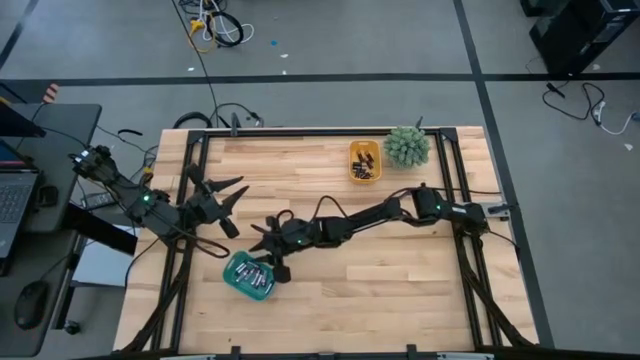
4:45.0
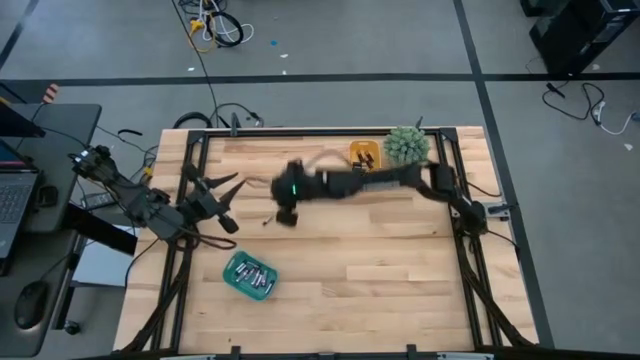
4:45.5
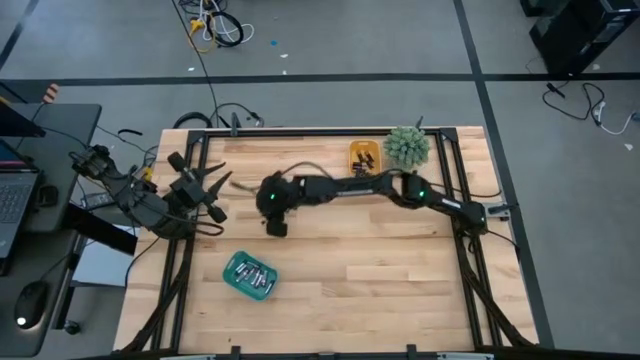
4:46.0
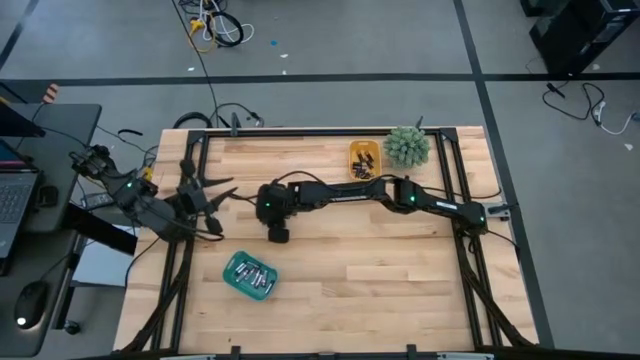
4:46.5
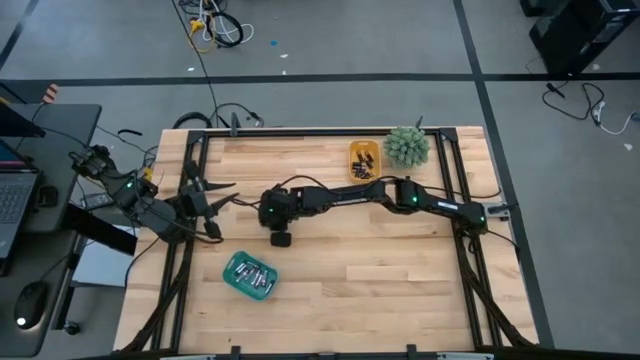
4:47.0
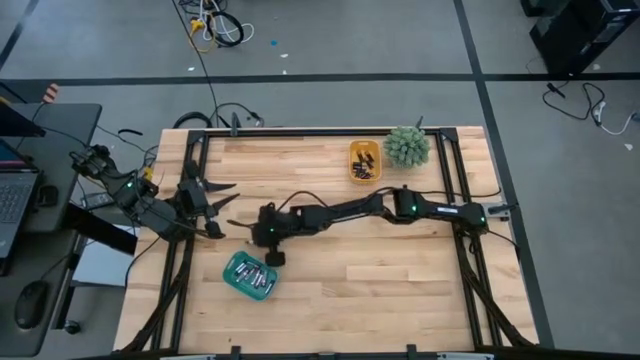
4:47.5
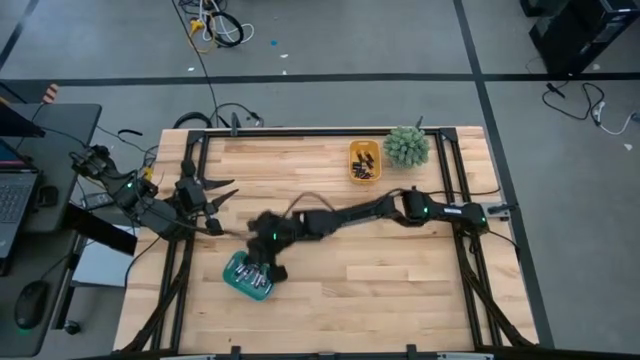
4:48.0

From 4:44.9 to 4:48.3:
Task: Sort batteries
Put the silver battery into the green bin

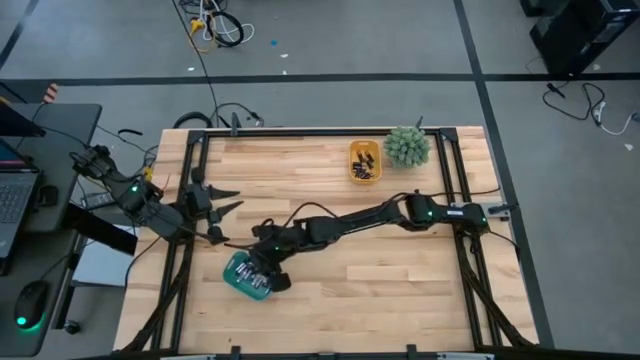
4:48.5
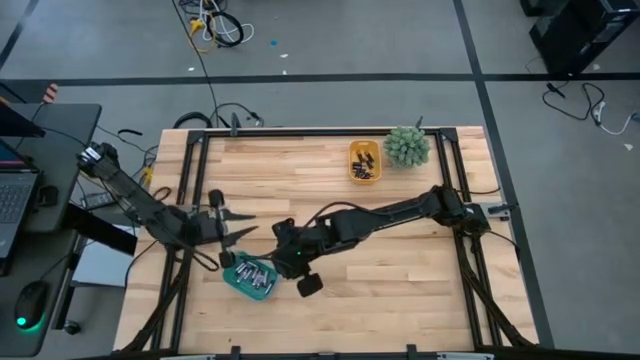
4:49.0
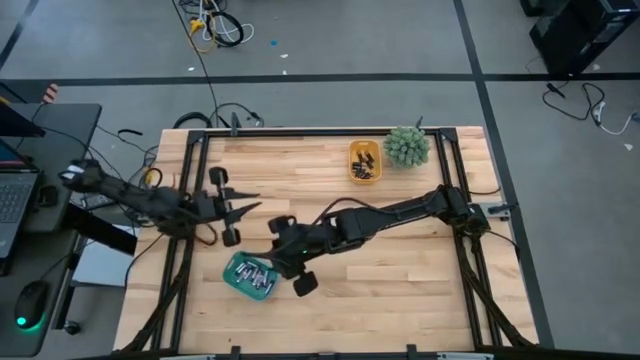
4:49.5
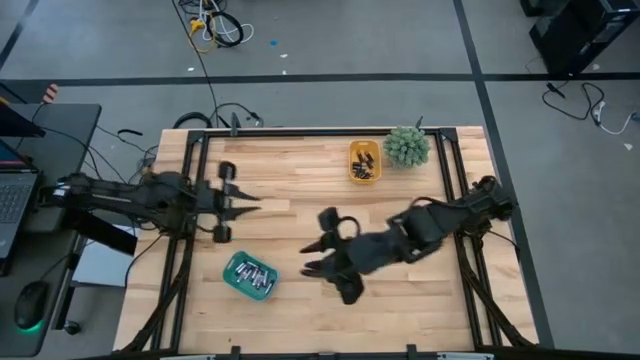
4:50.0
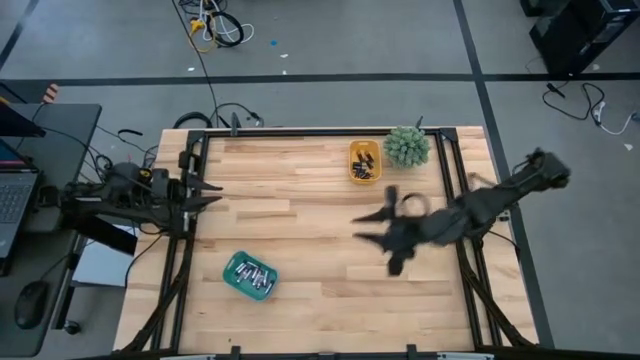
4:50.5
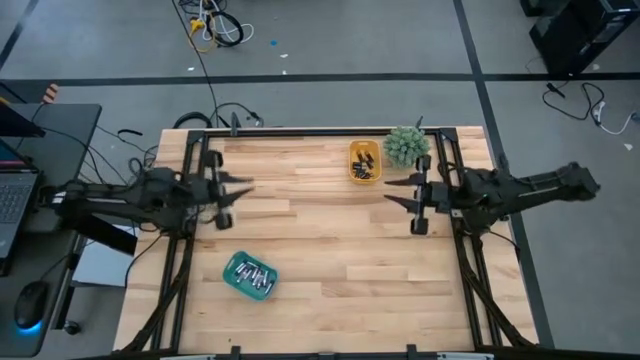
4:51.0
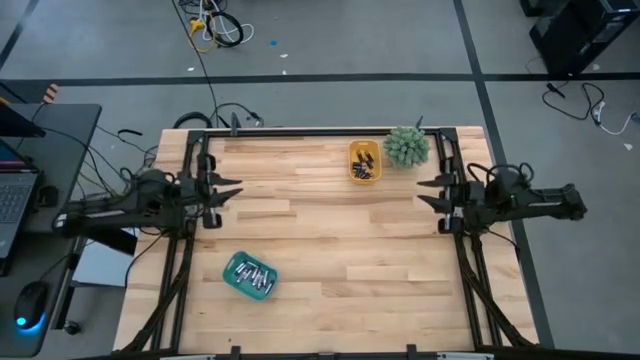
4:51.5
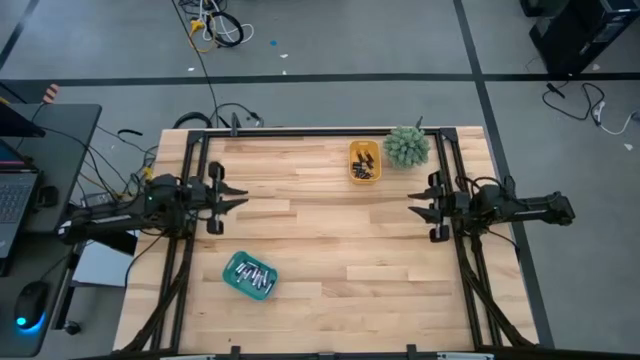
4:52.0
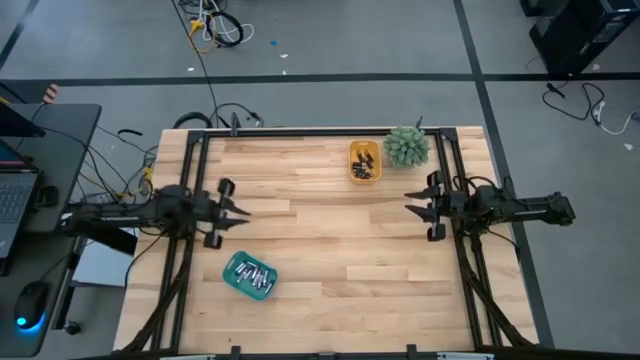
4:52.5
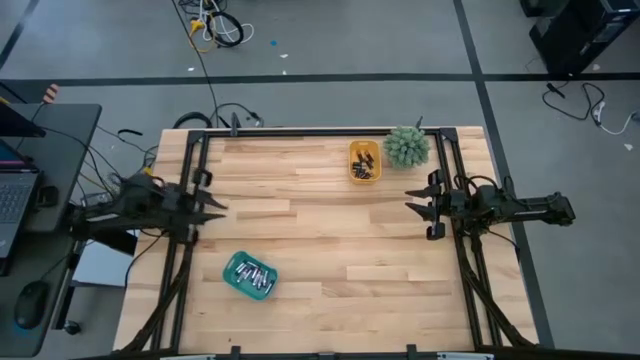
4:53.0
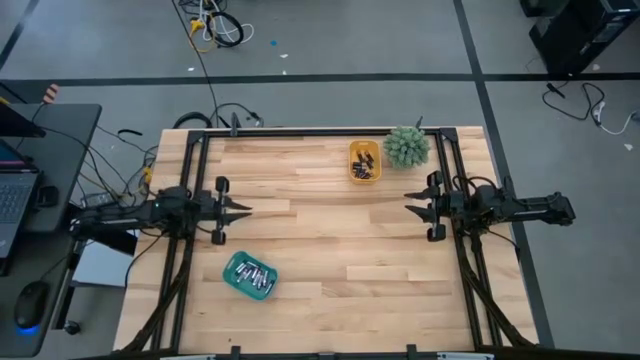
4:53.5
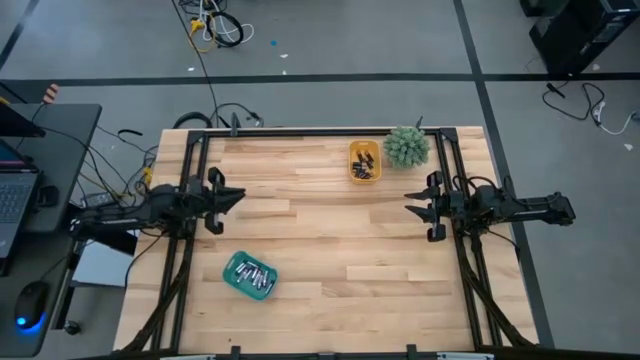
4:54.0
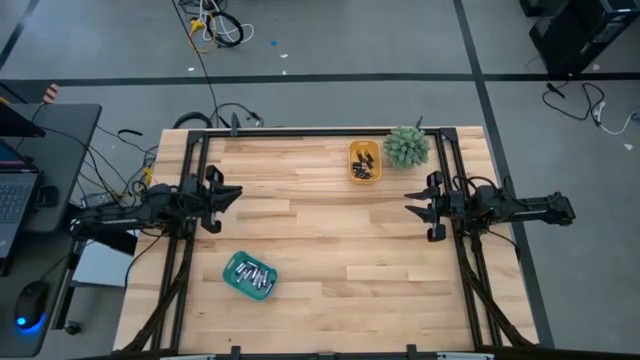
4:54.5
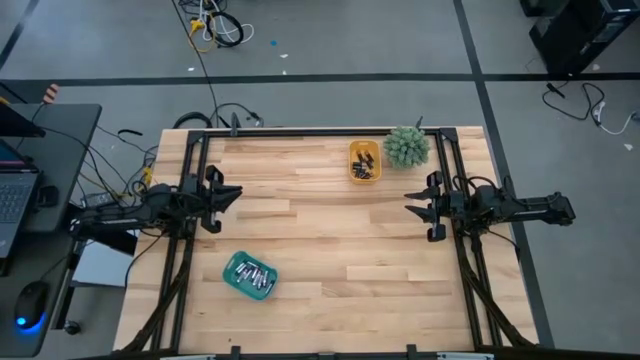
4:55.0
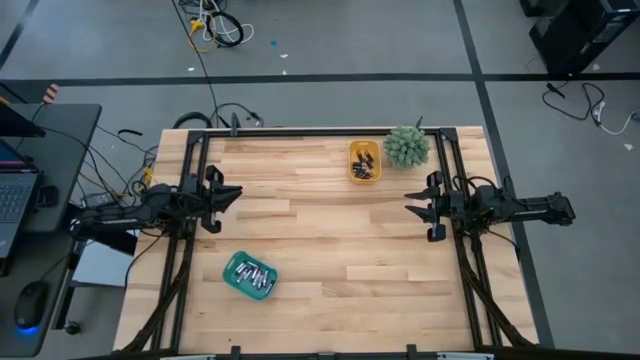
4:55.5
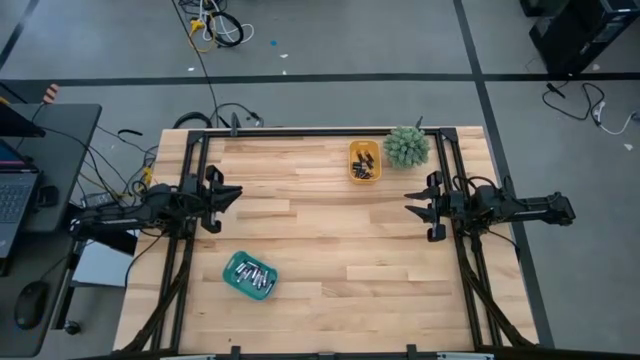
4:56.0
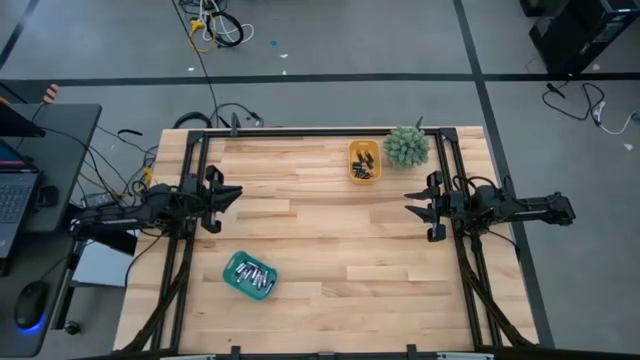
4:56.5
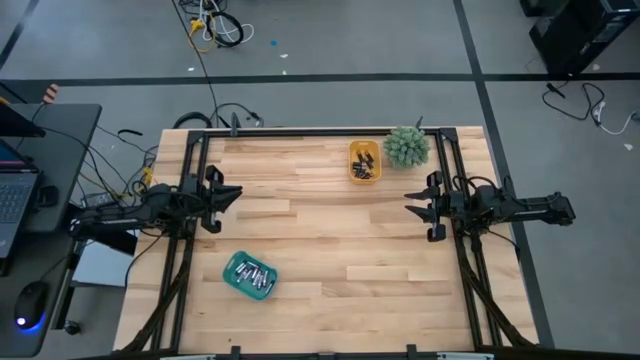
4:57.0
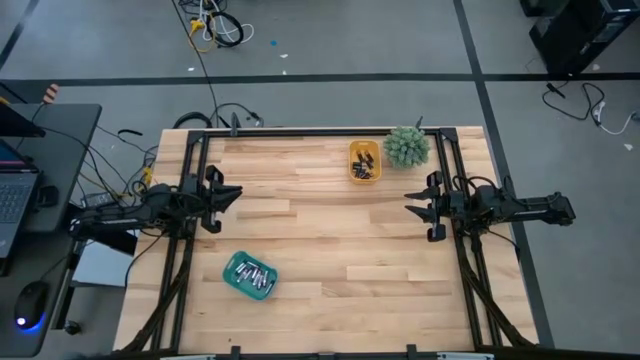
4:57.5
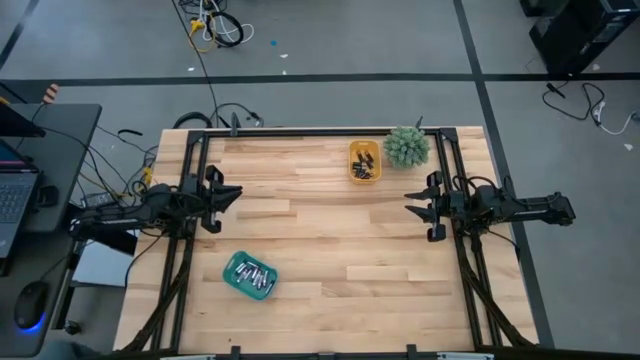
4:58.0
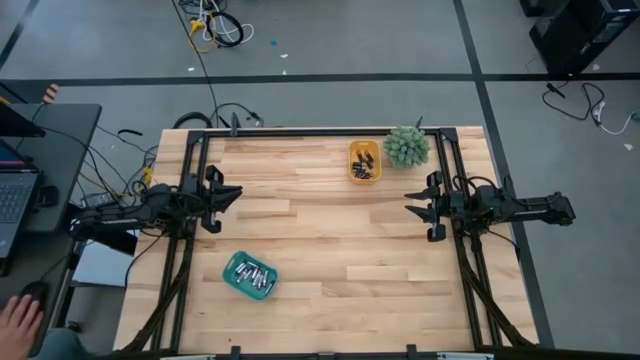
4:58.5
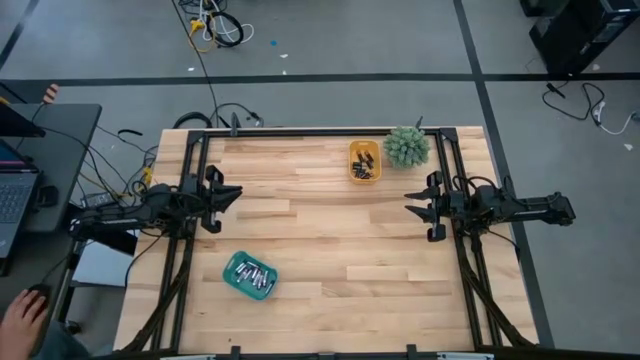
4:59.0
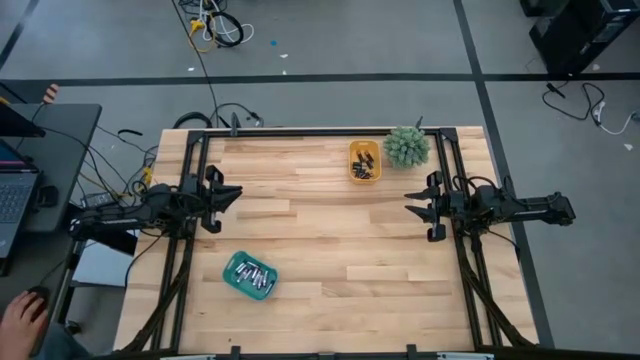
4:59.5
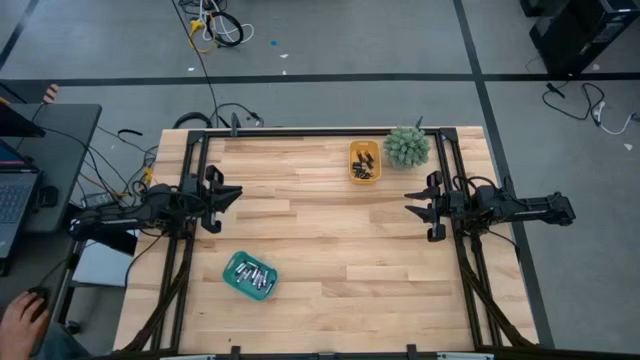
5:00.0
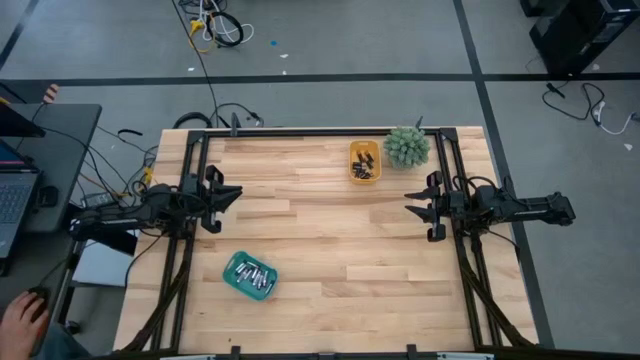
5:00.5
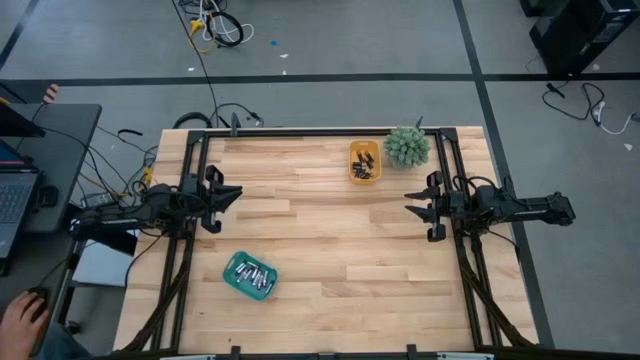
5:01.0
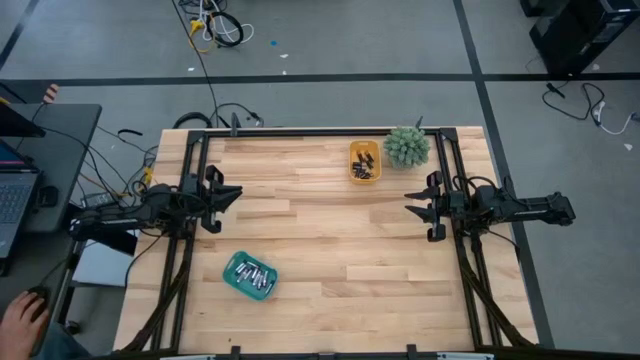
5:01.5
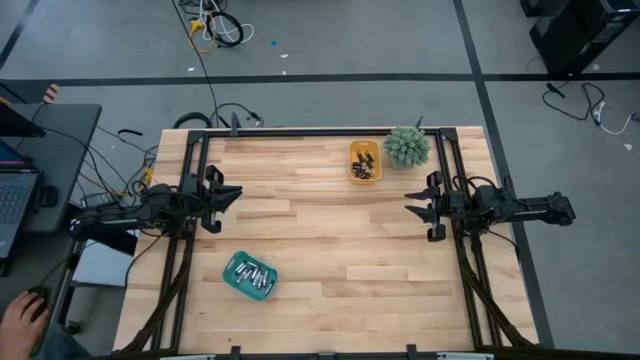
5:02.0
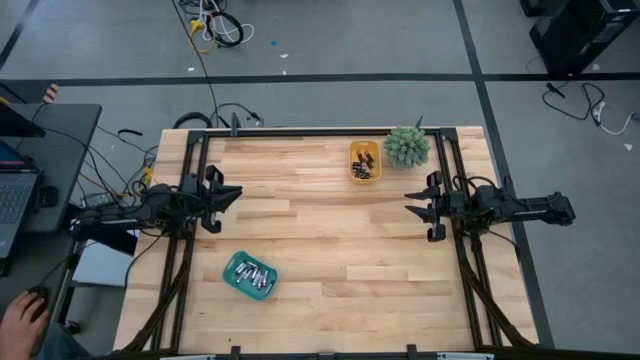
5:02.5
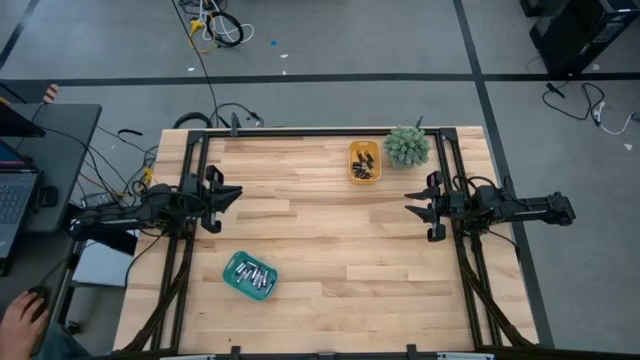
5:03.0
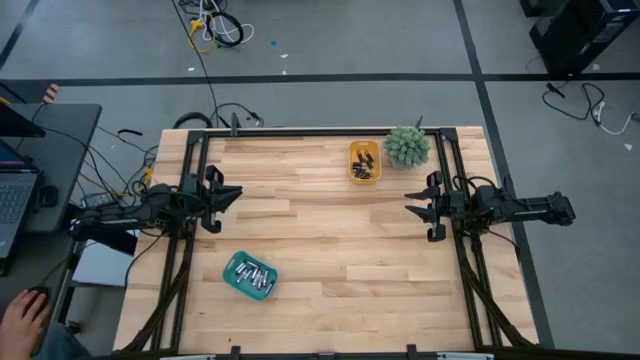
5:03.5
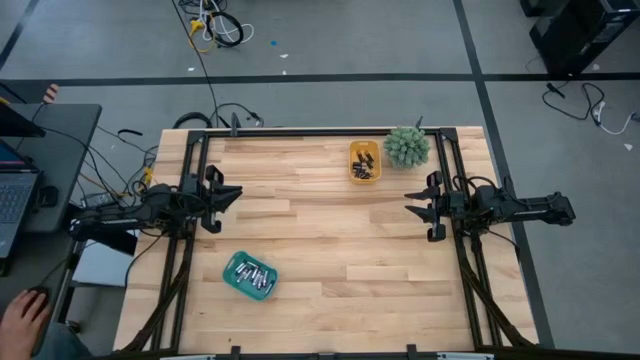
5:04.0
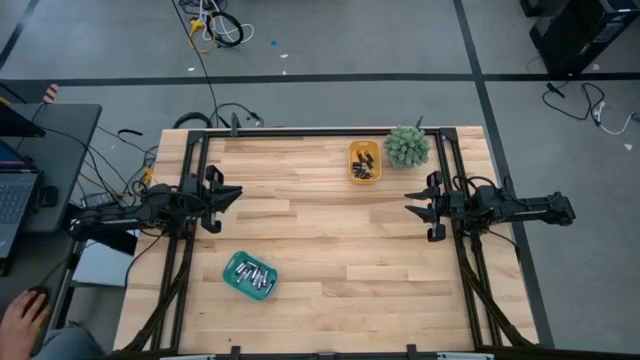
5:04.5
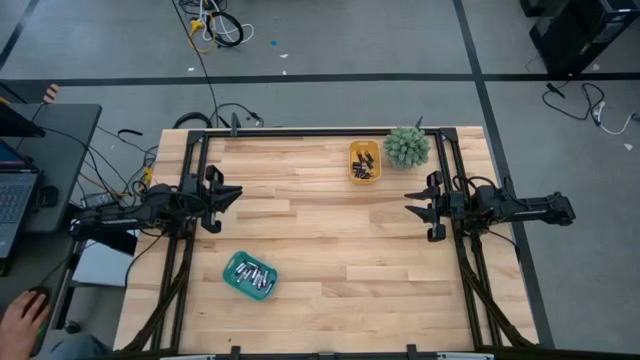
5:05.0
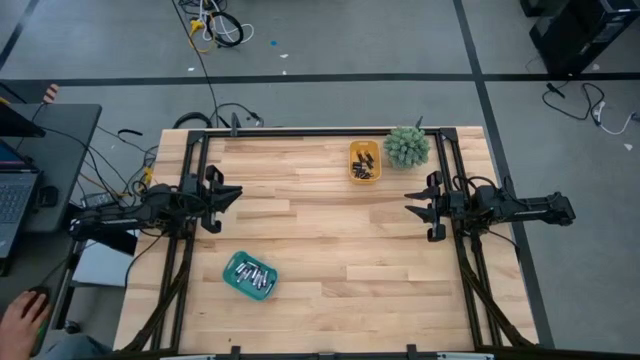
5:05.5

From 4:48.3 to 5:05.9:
Return to Home Position
